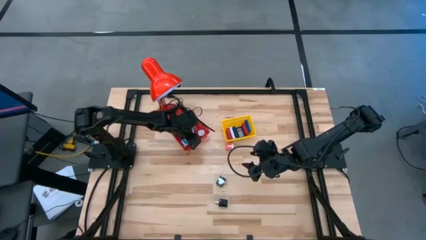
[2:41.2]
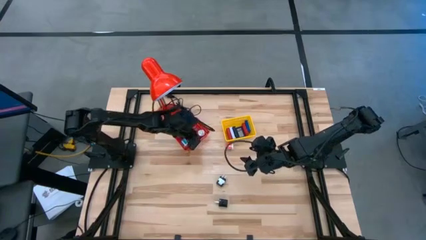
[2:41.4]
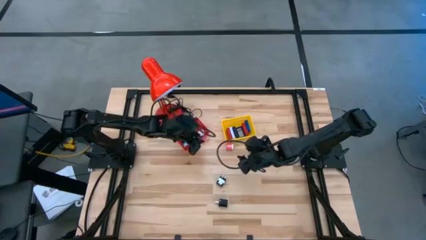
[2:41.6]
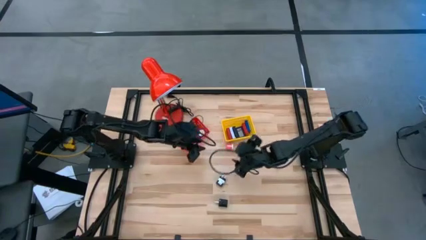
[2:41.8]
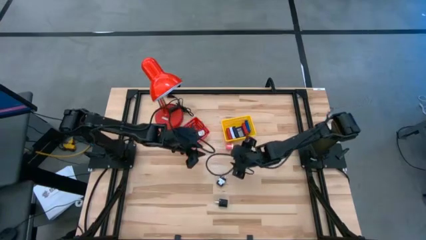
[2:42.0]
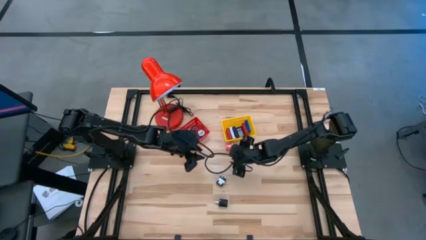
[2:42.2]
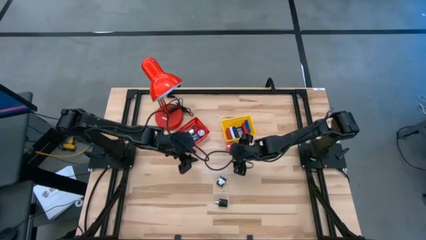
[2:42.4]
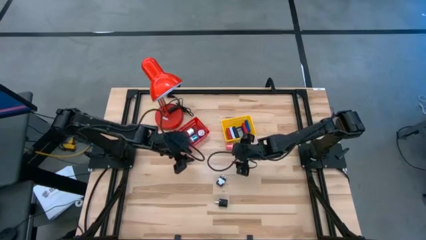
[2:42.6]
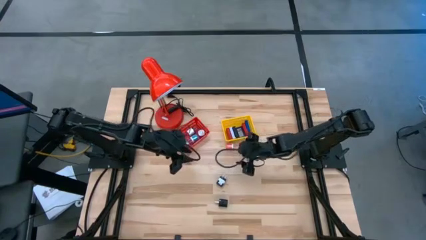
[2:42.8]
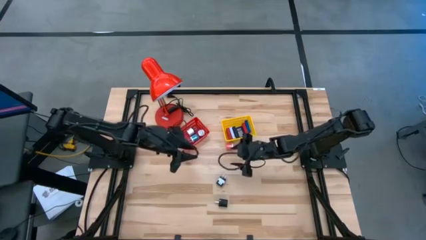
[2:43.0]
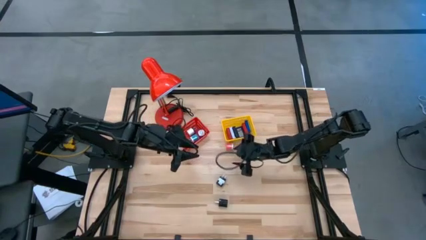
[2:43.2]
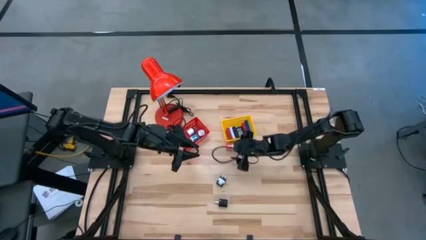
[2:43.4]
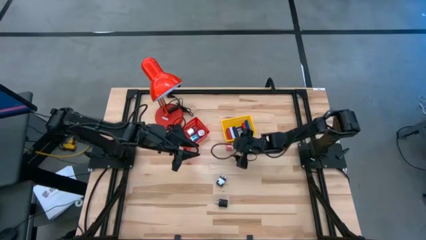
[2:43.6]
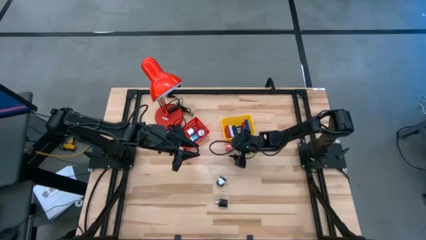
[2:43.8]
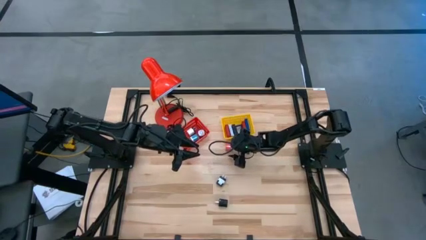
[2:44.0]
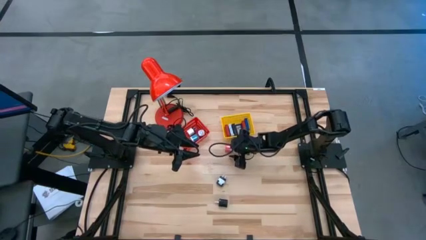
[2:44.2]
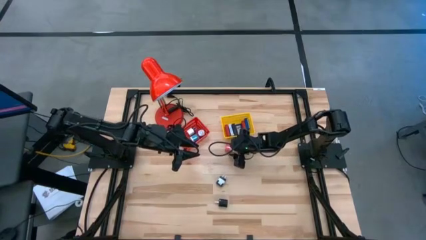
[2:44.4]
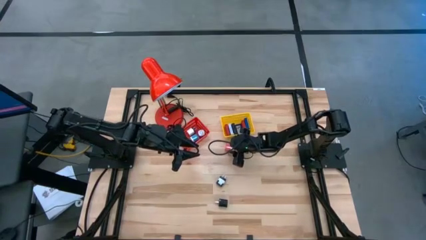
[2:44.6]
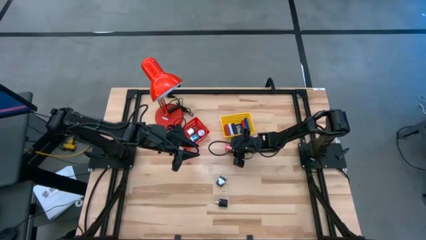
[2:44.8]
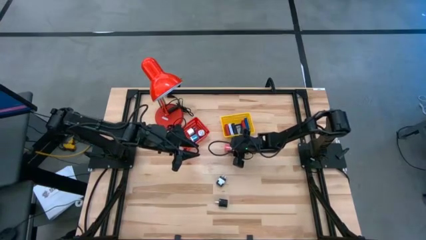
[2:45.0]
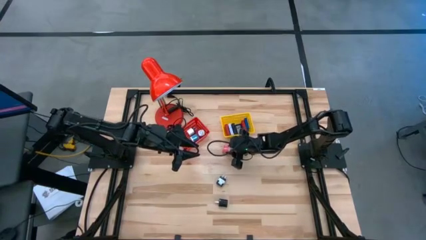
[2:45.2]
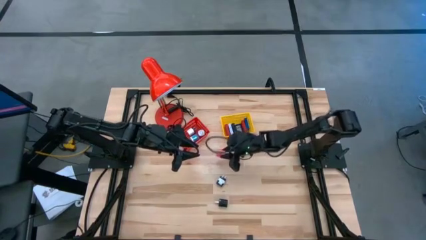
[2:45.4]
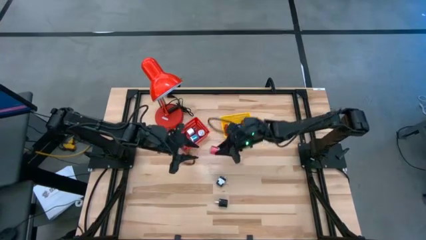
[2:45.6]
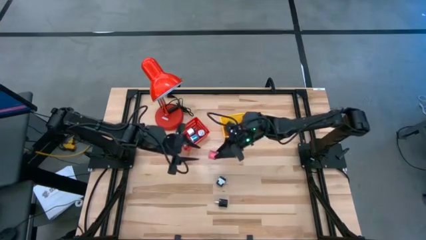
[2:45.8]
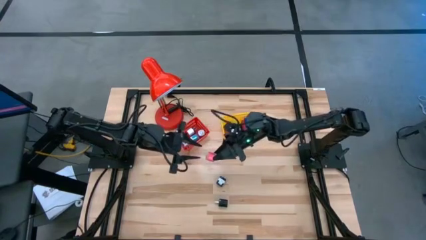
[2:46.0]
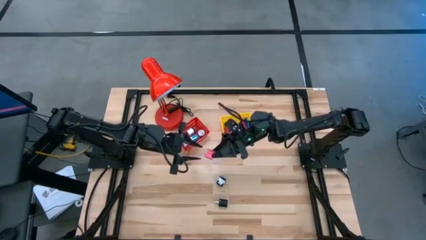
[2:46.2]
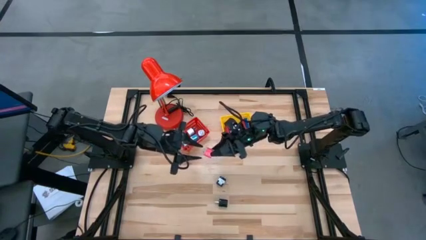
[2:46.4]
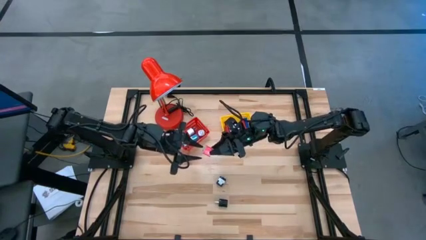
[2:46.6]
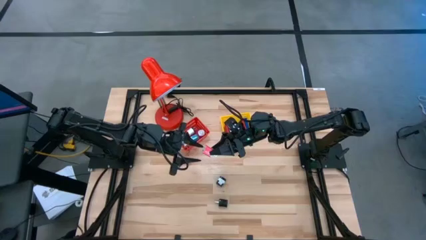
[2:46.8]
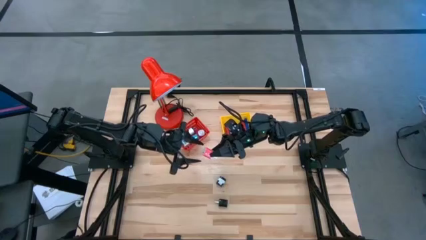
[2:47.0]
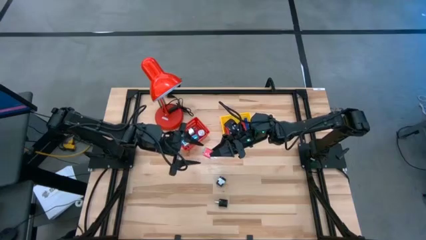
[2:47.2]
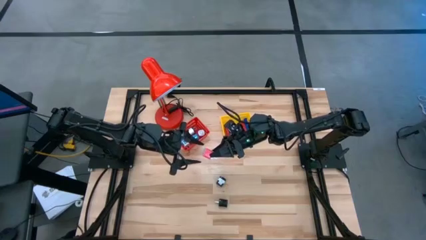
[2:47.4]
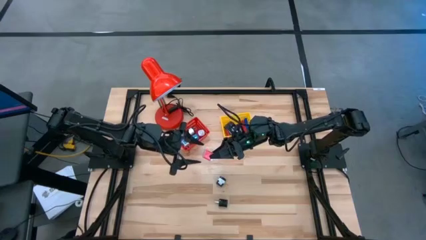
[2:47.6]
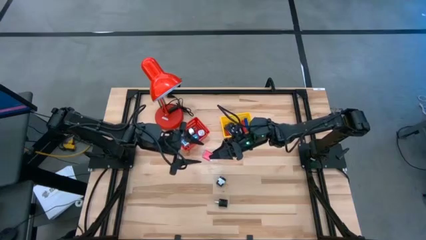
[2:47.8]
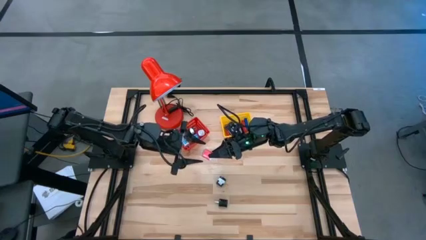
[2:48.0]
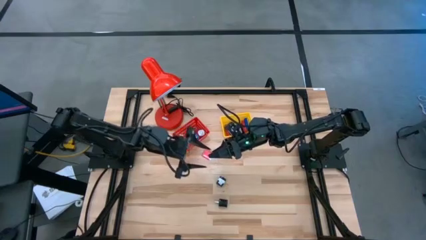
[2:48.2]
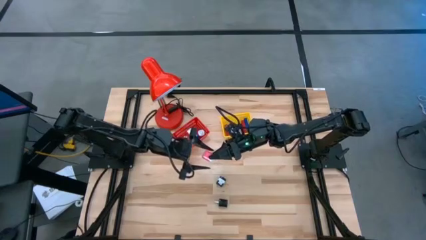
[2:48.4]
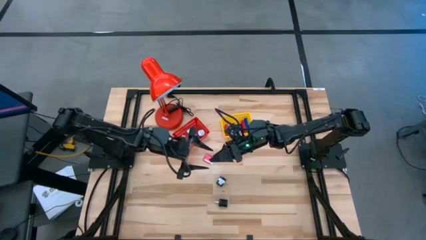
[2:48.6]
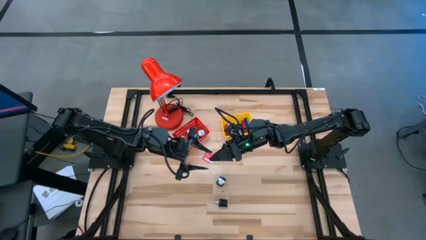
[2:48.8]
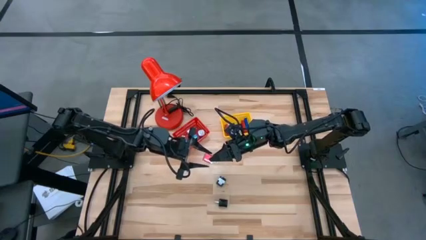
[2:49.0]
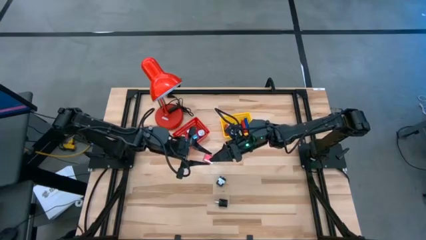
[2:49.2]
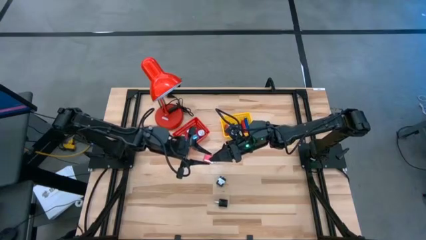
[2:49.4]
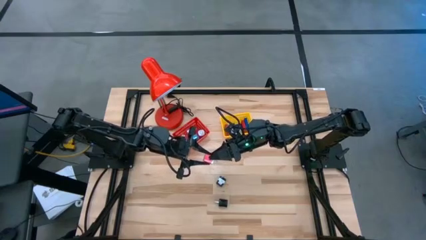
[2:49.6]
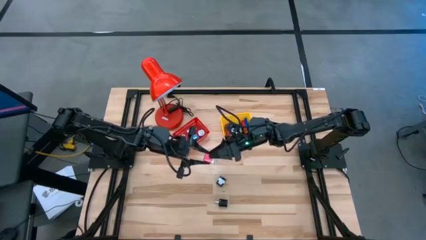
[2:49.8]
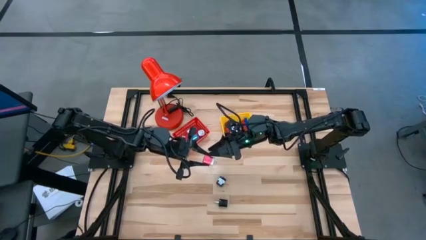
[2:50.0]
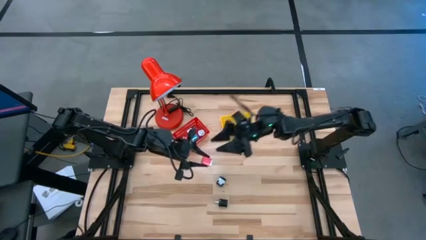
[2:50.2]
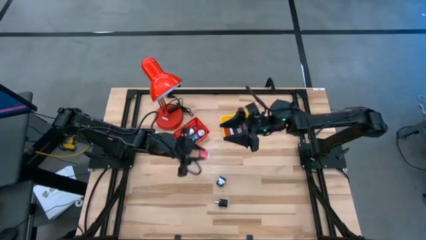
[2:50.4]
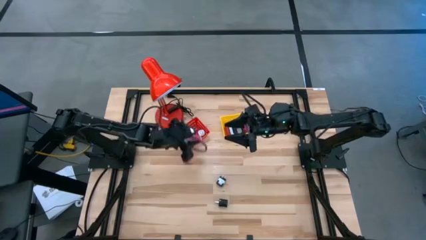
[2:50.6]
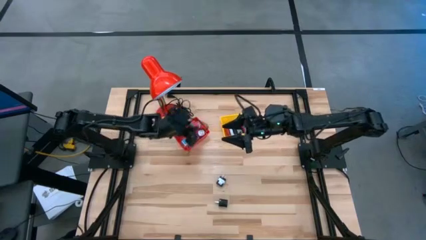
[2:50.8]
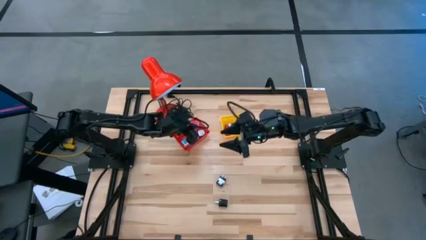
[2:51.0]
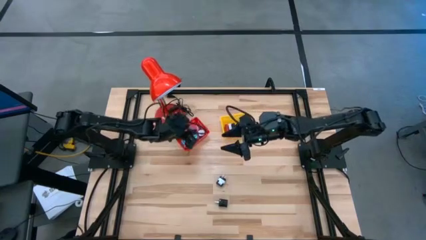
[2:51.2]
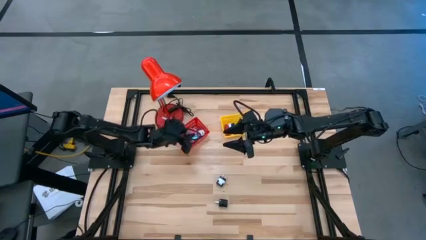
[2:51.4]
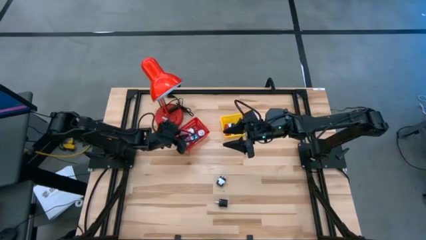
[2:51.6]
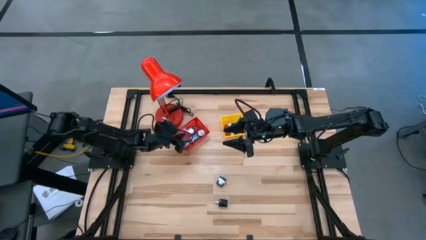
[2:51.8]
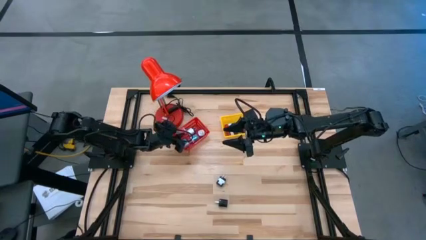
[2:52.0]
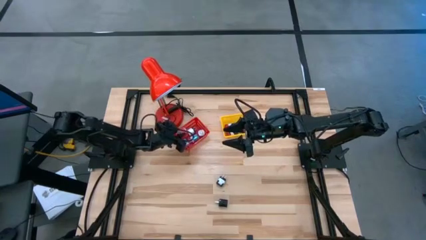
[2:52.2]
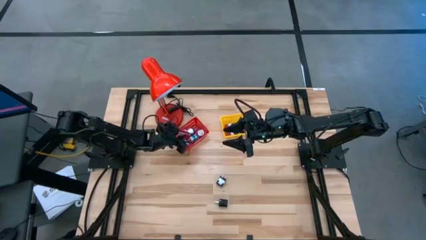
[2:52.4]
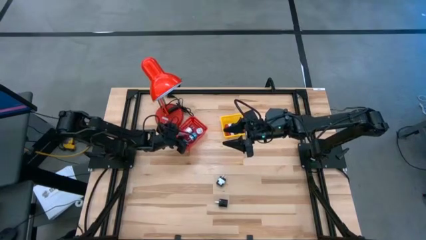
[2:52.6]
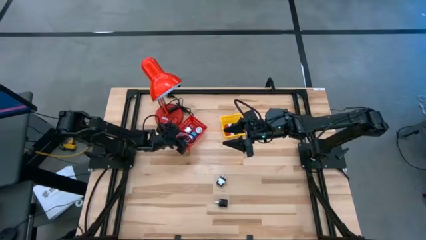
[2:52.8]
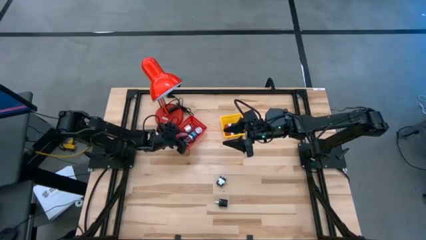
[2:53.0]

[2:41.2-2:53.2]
Task: Pick & Place Office items
Put the pink charger adapter into the red bin
